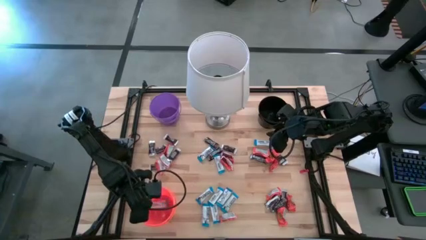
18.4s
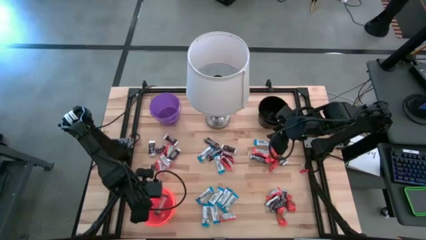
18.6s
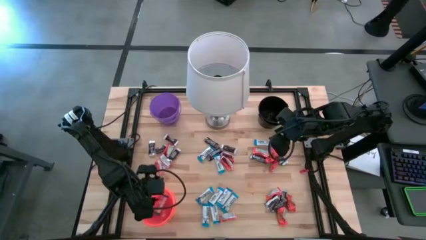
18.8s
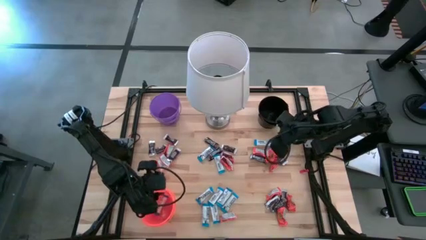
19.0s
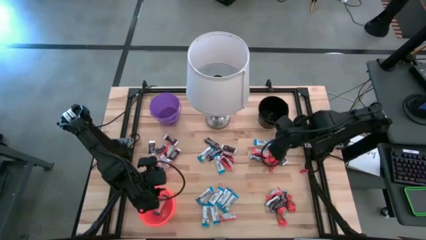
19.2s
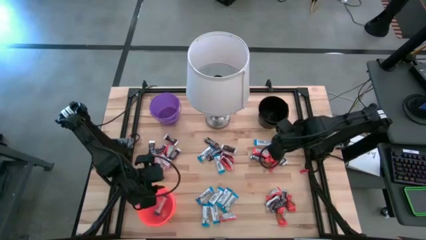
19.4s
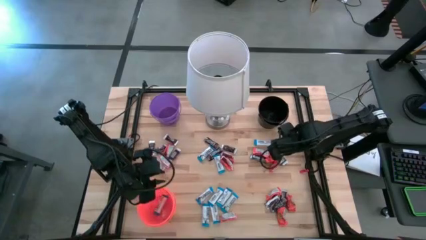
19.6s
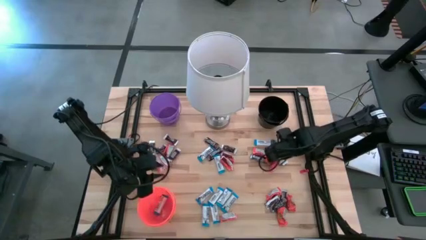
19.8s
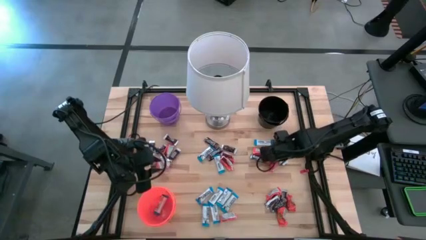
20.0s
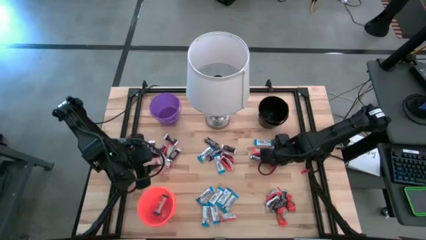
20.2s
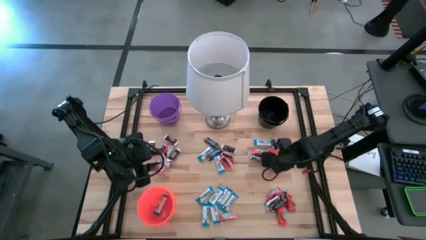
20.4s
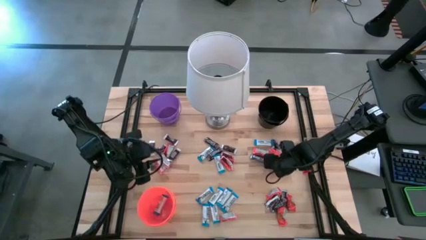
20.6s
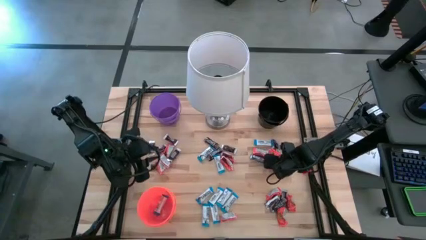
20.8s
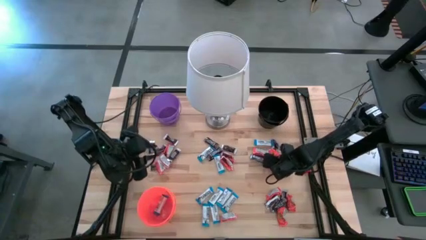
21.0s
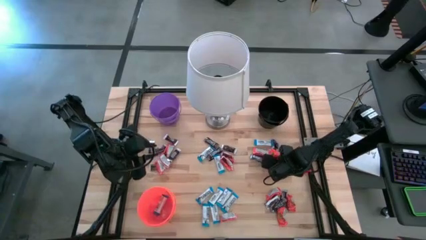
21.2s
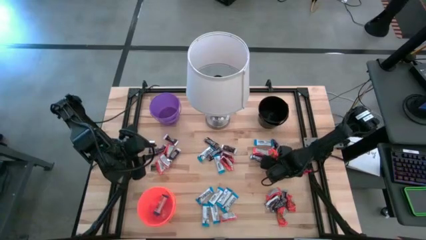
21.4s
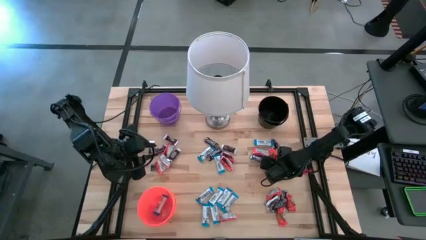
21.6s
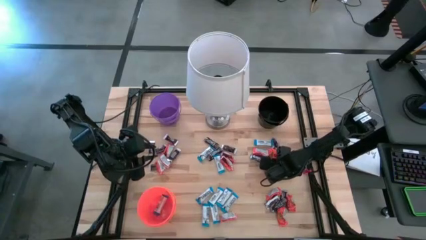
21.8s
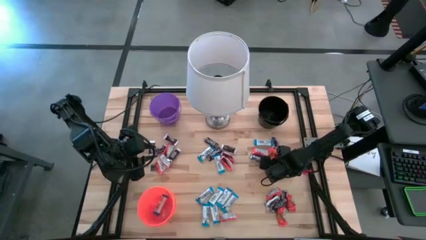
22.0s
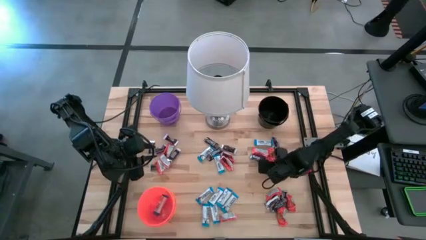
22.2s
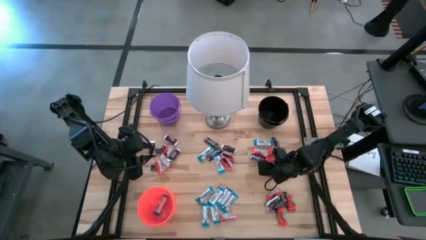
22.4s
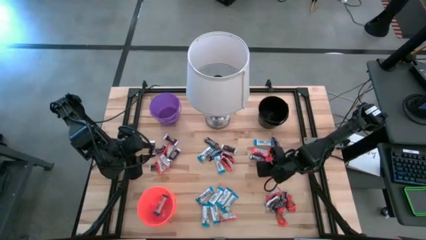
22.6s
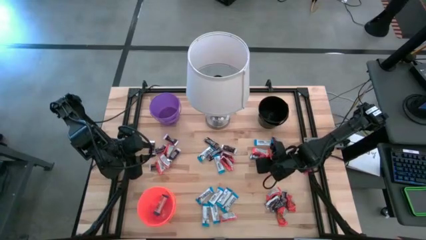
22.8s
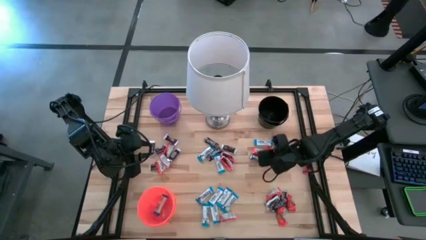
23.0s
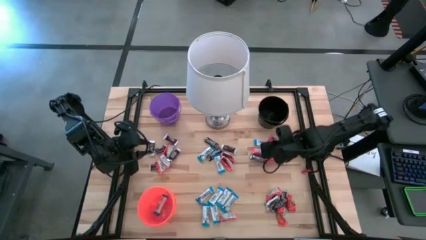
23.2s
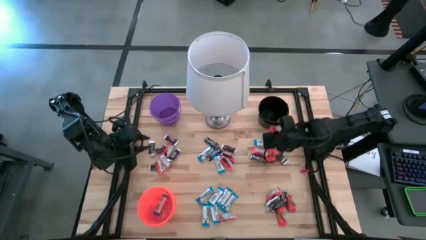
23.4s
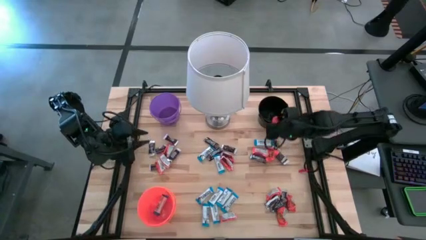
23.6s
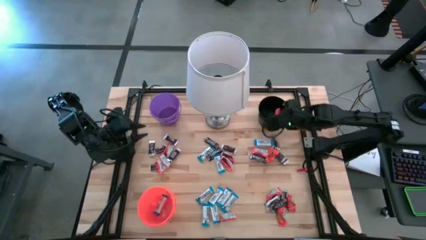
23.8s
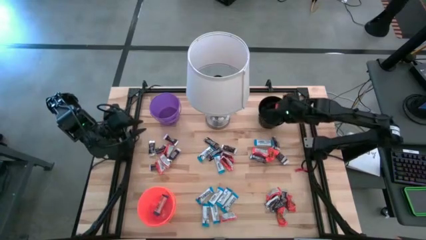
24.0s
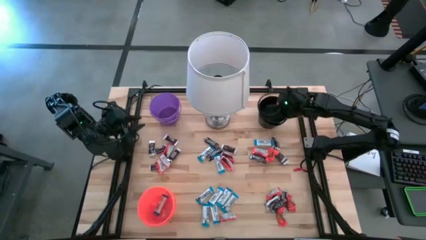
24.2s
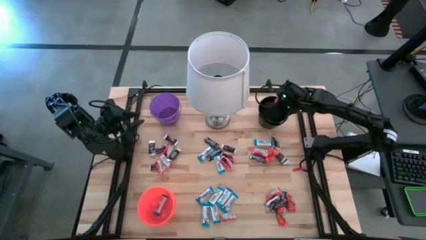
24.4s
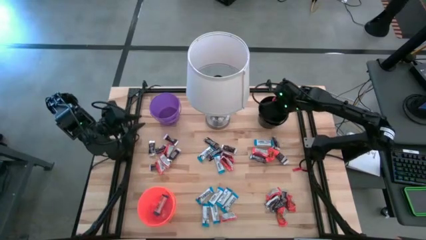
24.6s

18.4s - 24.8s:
Task: Organize candy in baskets
Put the orange chocolate bar into the black bucket

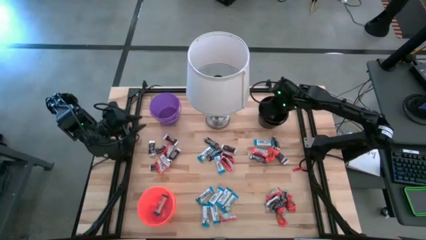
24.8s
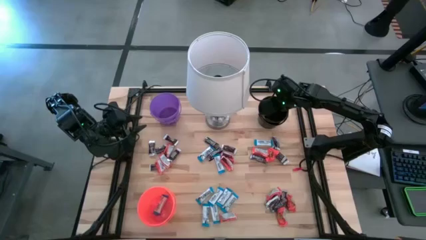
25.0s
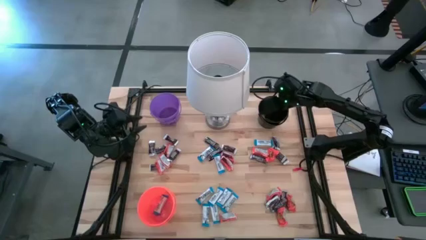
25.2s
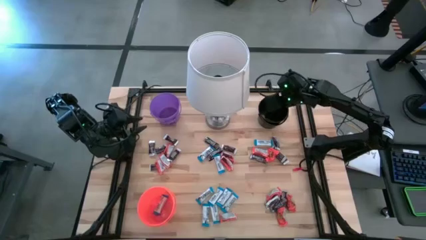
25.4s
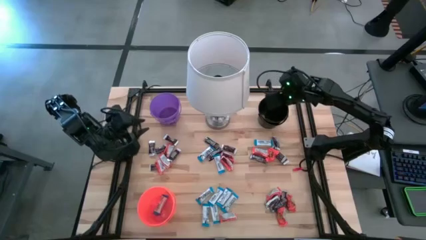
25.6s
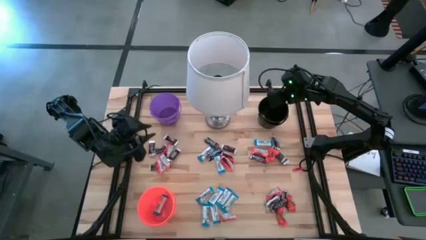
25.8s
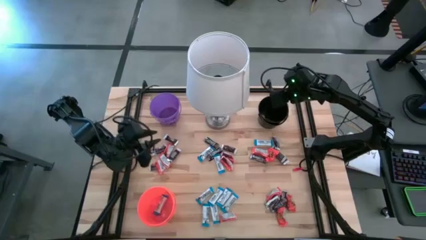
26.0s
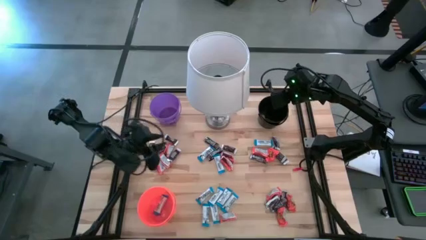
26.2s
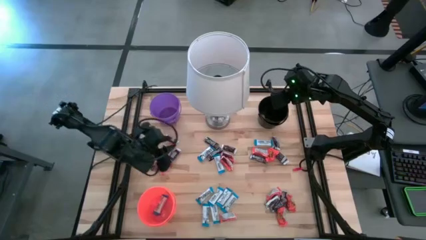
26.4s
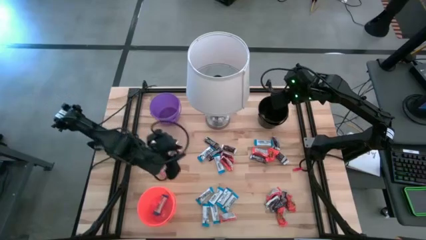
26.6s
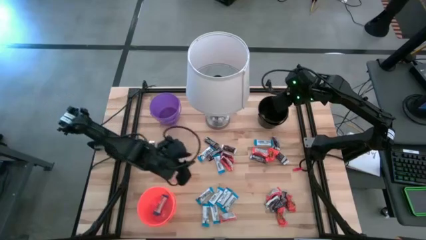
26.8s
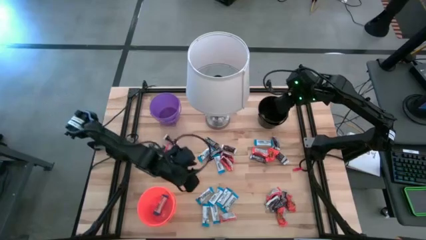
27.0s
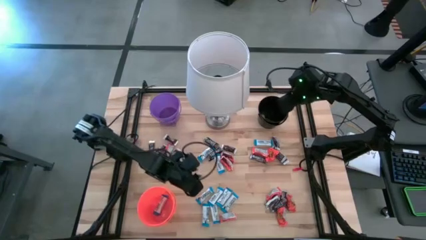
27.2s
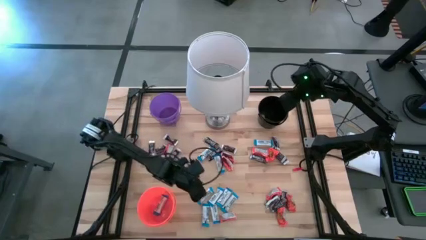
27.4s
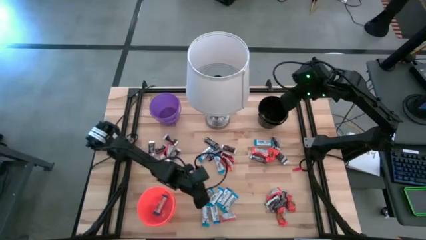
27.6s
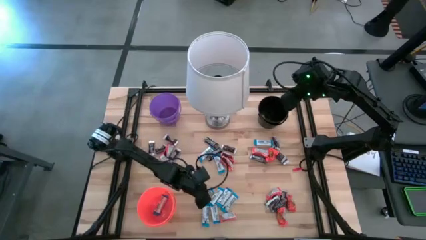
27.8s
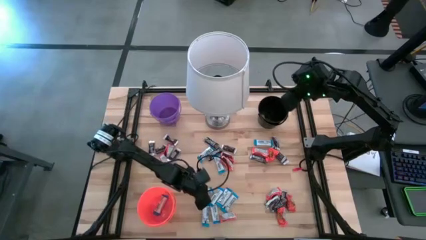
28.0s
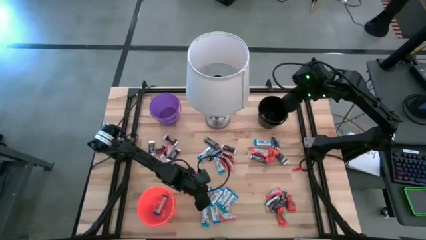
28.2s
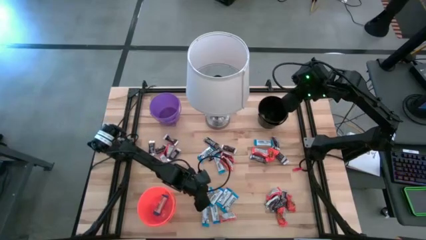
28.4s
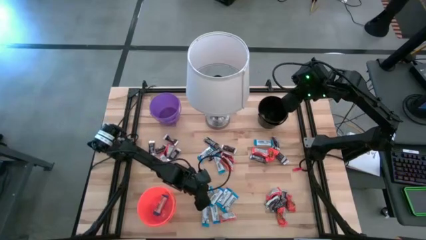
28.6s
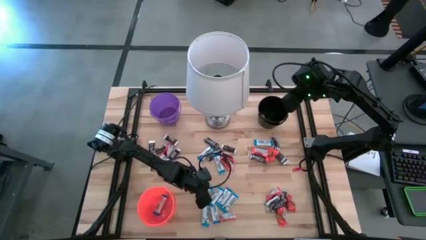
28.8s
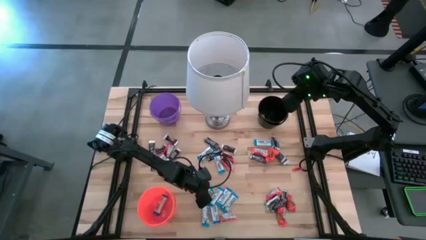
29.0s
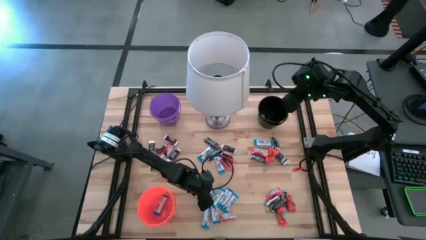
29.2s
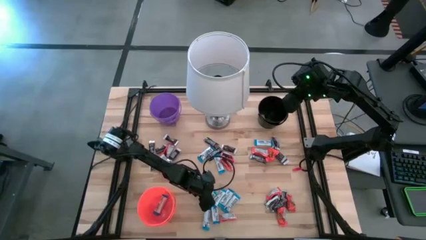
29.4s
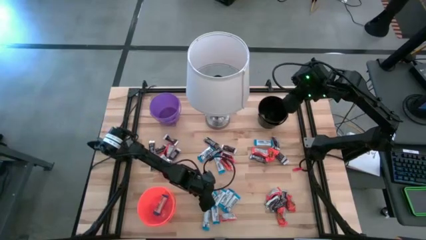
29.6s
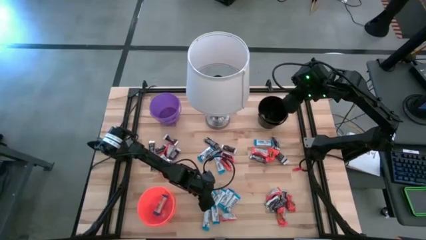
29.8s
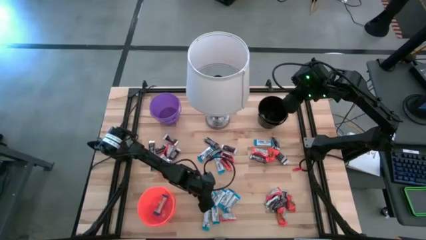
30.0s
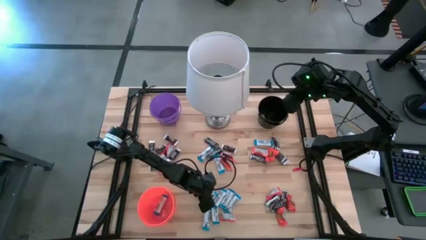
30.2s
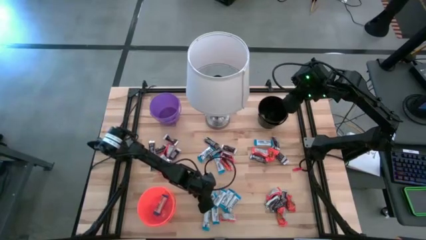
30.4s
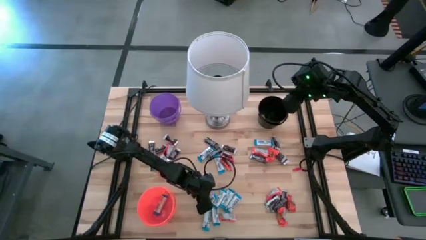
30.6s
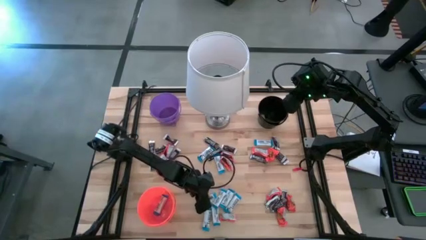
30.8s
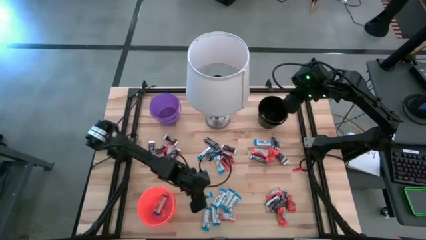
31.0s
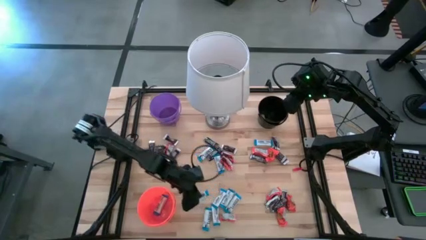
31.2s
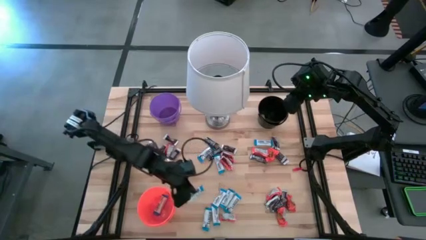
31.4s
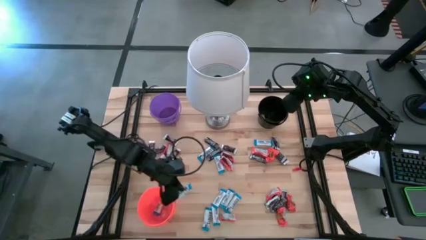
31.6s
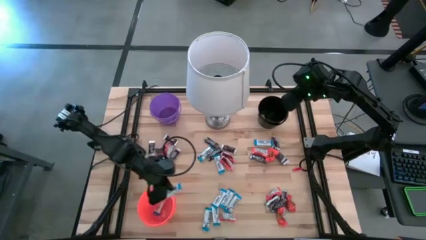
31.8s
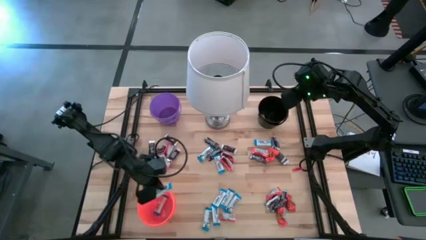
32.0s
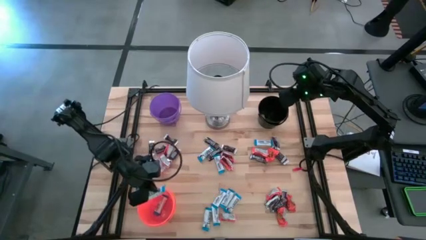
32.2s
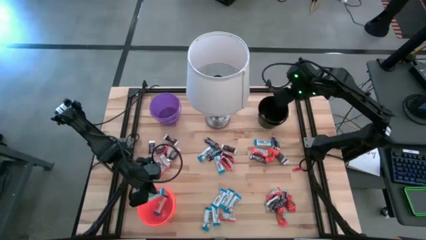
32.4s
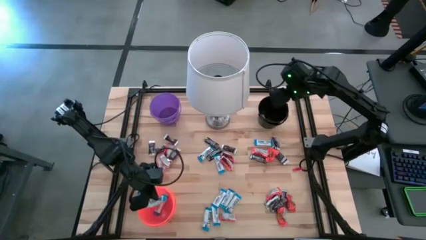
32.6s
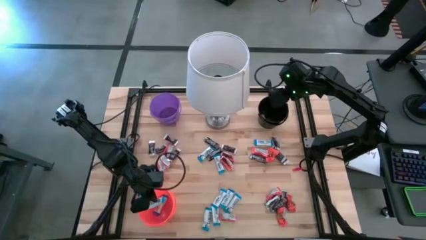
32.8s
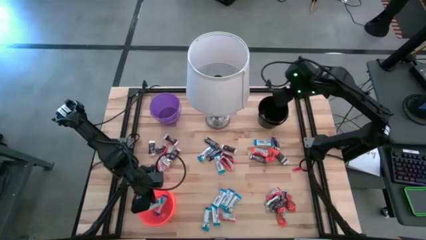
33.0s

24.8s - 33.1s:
Put the white chocolate bar into the orange bucket

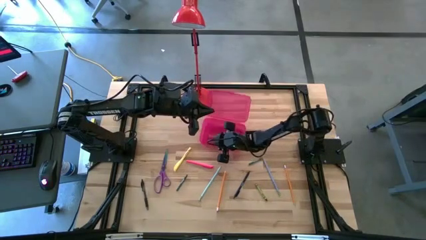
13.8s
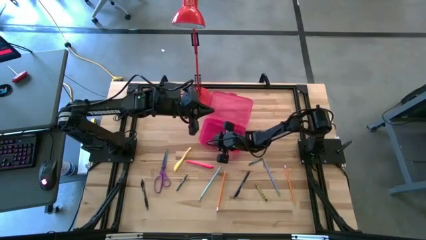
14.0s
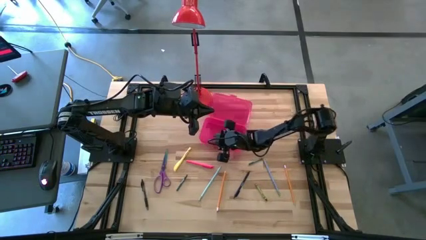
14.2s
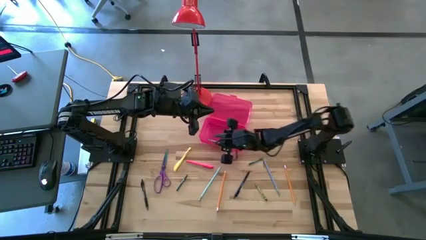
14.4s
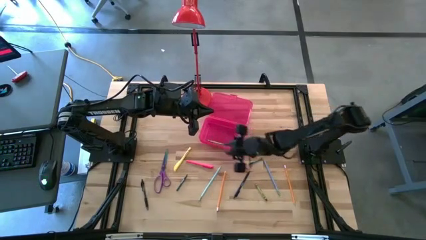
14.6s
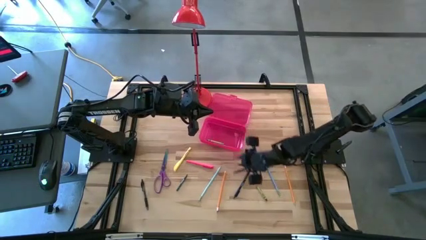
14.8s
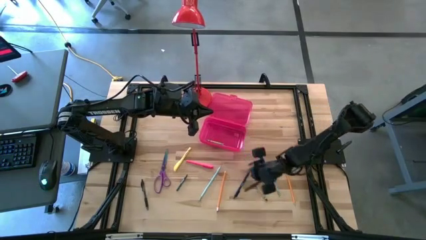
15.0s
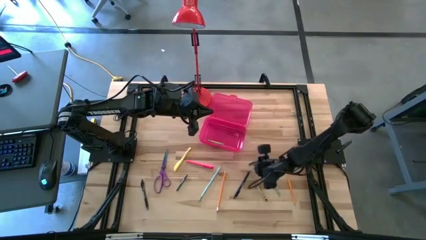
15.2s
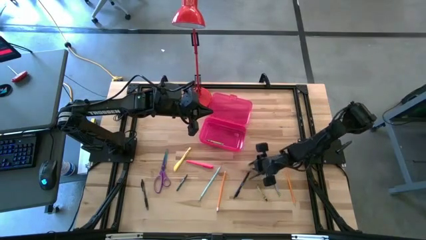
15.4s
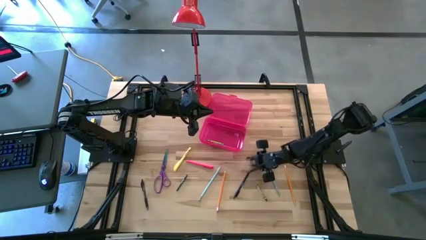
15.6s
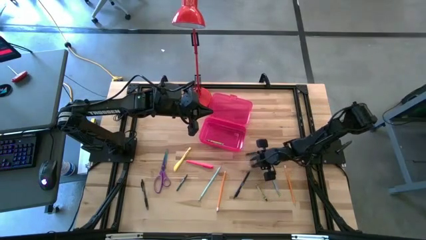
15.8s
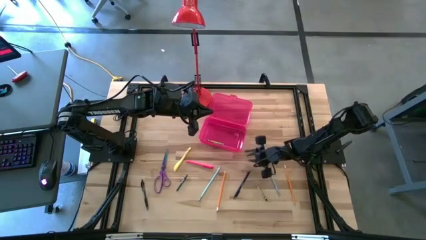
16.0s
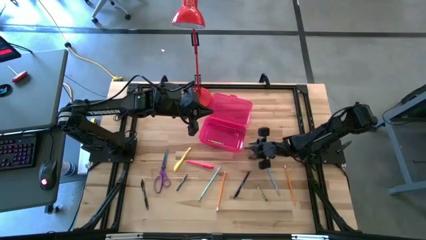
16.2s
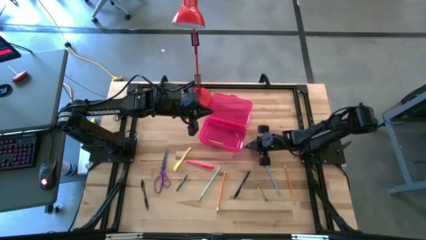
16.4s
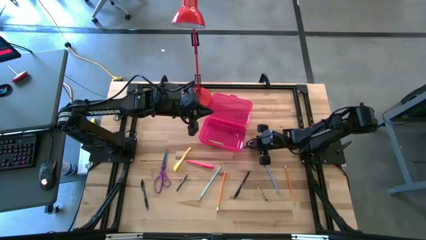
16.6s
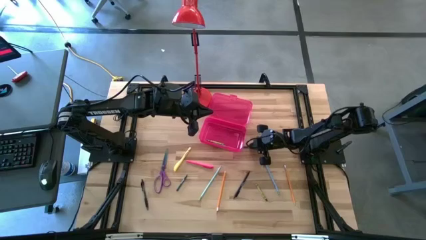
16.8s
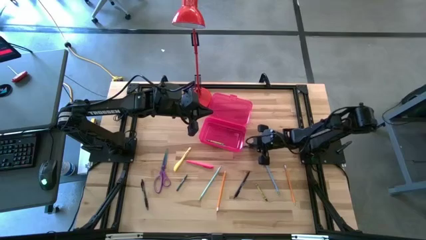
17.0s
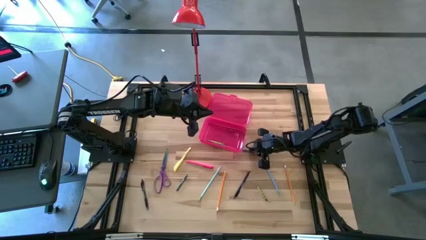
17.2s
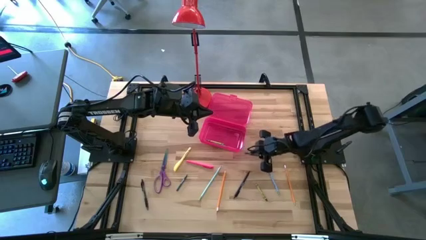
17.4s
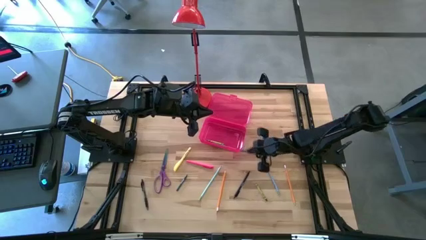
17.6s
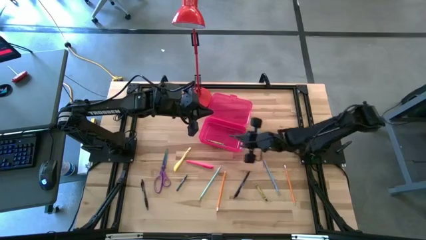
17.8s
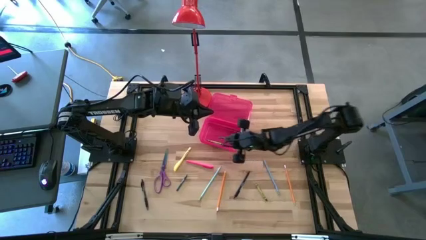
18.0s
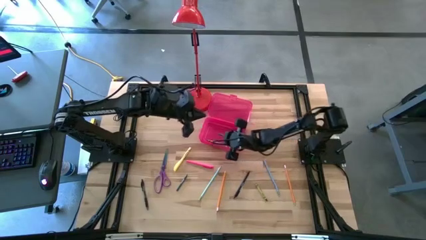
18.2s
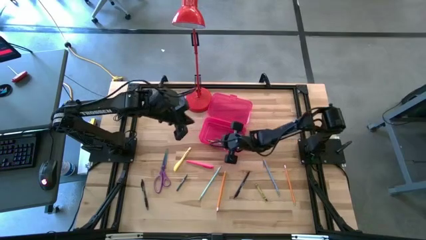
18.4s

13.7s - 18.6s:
Task: Pick & place school supplies into a supply box
Put the dark green crayon into the pink supply box
